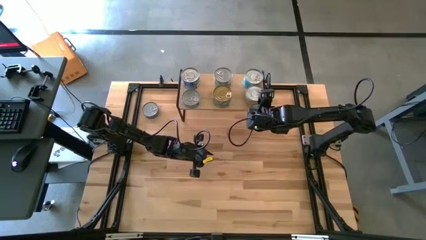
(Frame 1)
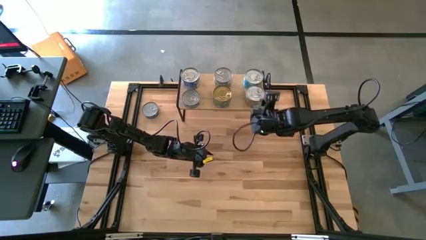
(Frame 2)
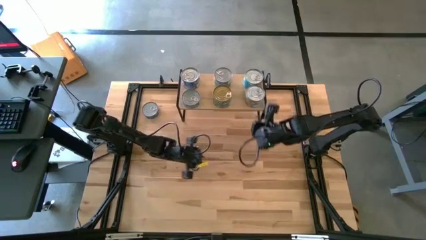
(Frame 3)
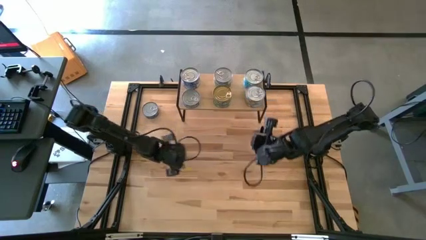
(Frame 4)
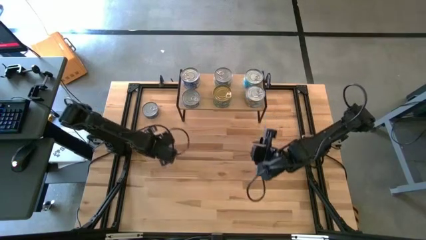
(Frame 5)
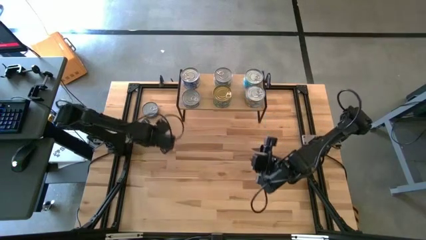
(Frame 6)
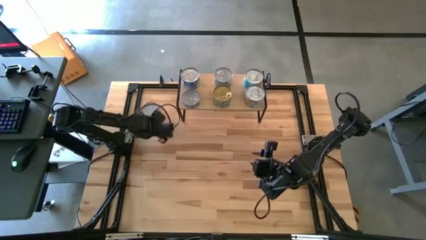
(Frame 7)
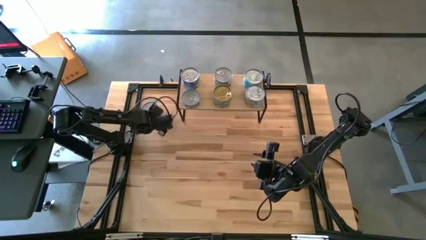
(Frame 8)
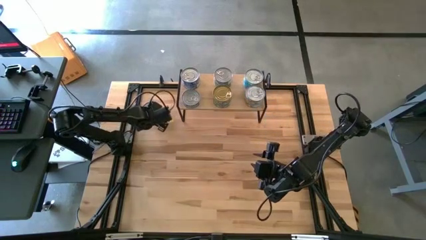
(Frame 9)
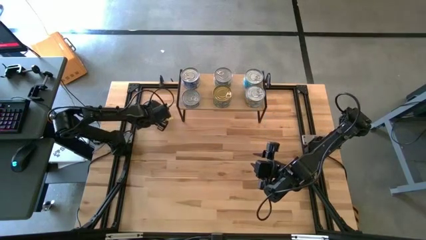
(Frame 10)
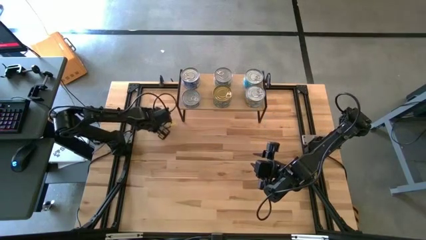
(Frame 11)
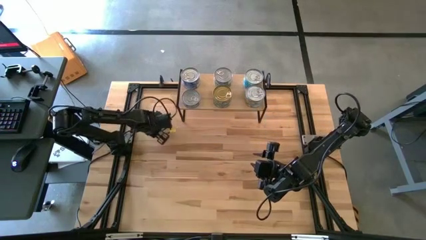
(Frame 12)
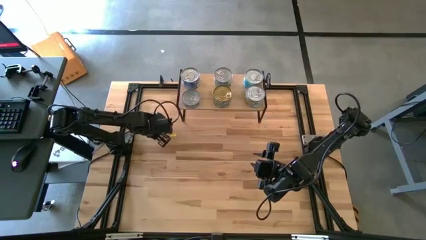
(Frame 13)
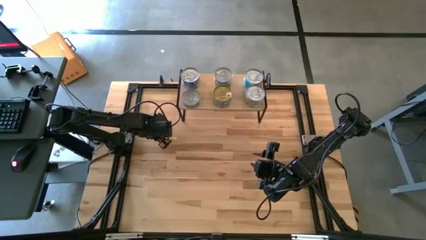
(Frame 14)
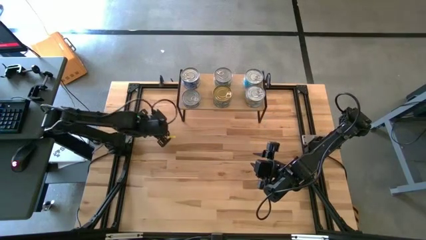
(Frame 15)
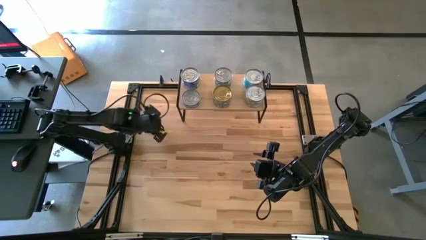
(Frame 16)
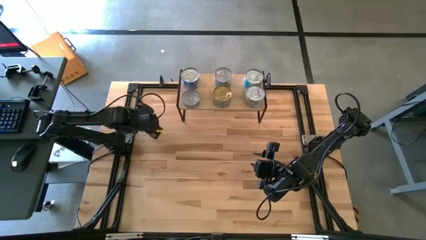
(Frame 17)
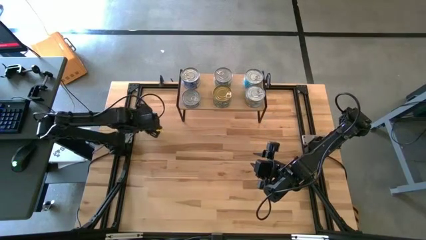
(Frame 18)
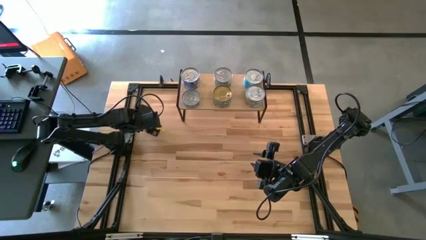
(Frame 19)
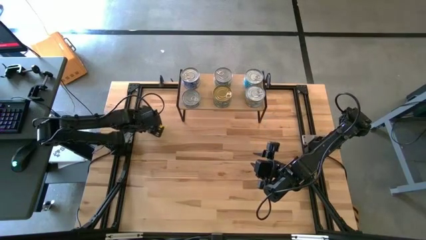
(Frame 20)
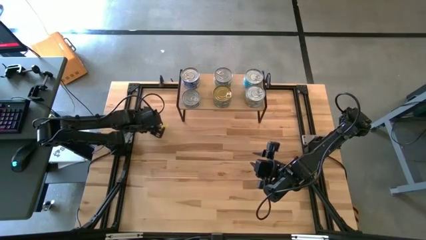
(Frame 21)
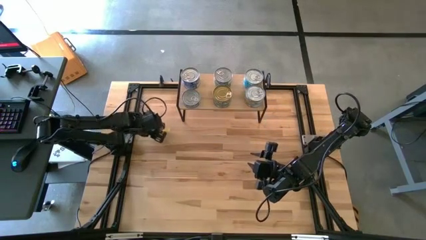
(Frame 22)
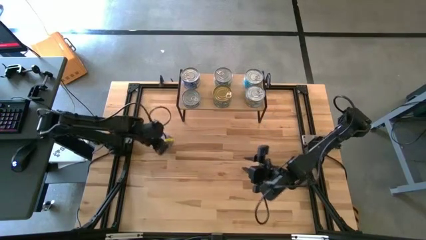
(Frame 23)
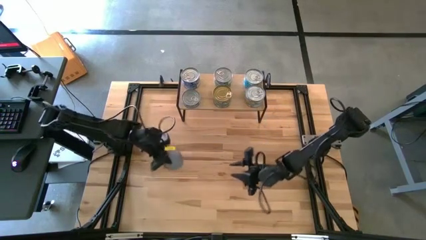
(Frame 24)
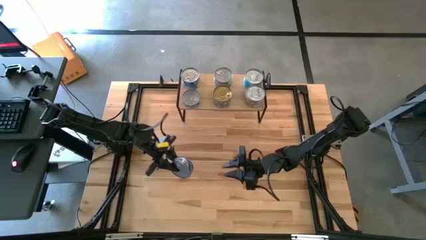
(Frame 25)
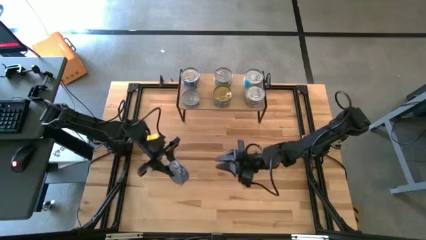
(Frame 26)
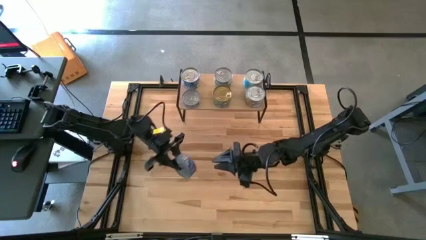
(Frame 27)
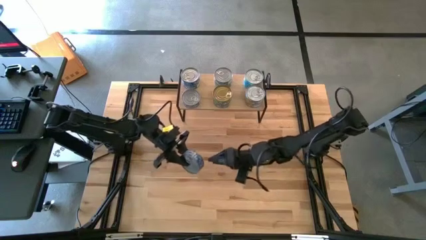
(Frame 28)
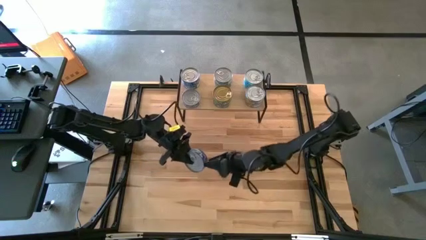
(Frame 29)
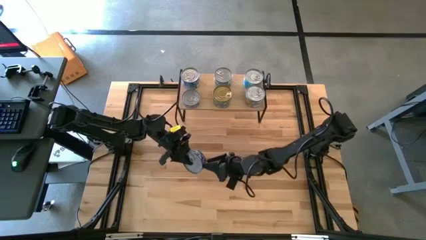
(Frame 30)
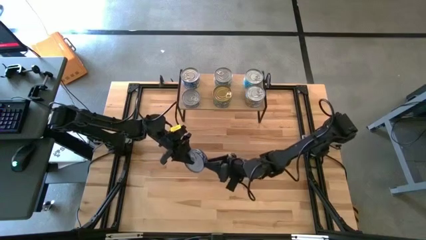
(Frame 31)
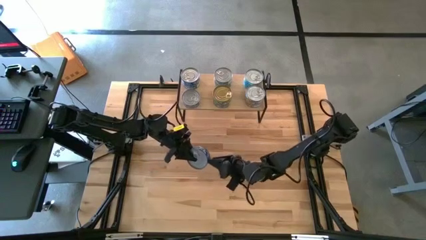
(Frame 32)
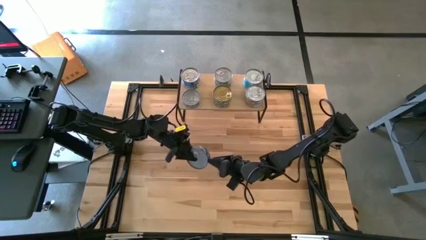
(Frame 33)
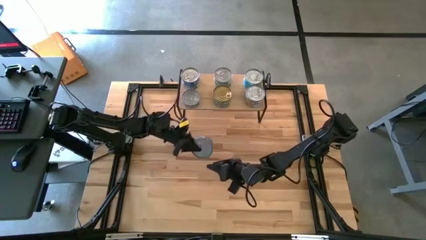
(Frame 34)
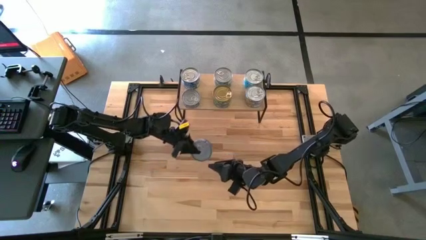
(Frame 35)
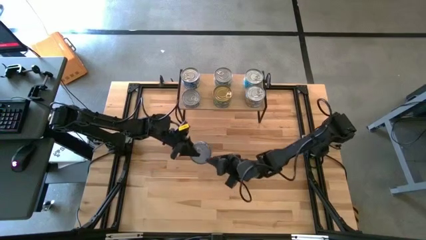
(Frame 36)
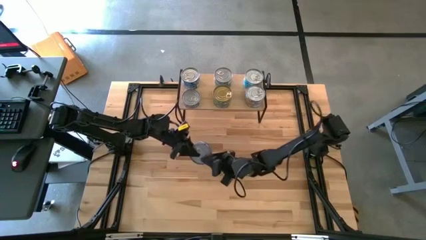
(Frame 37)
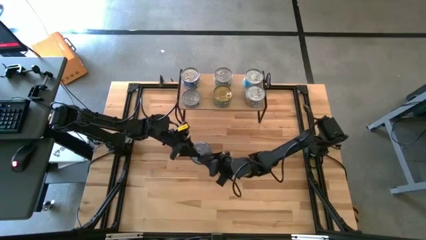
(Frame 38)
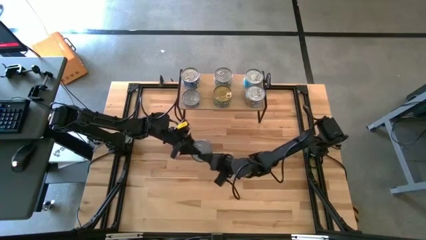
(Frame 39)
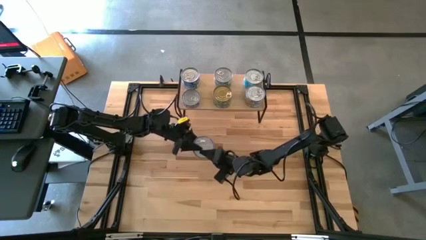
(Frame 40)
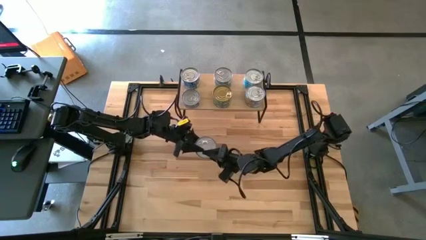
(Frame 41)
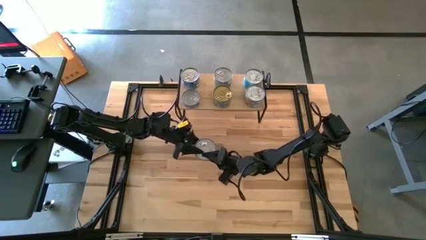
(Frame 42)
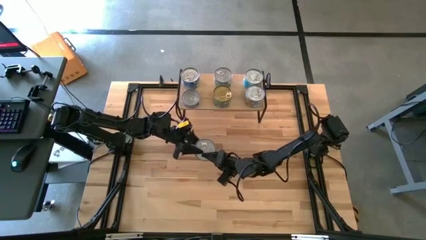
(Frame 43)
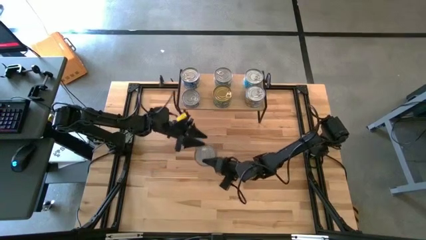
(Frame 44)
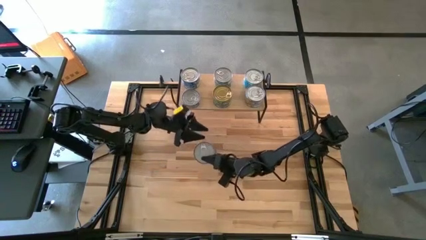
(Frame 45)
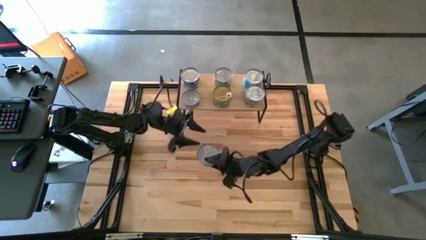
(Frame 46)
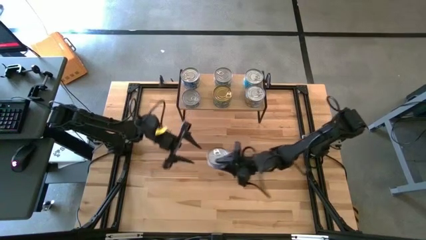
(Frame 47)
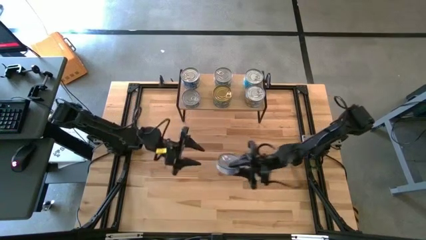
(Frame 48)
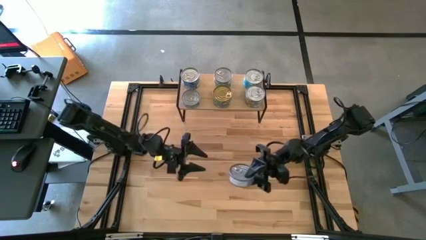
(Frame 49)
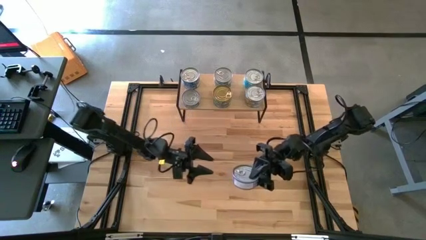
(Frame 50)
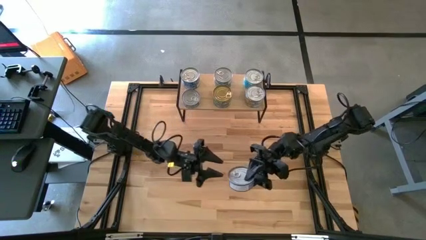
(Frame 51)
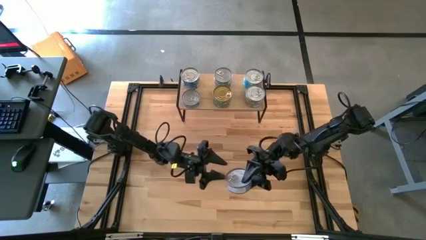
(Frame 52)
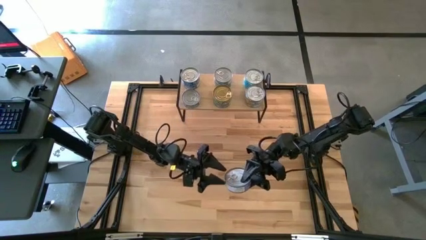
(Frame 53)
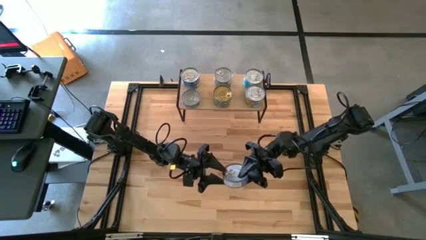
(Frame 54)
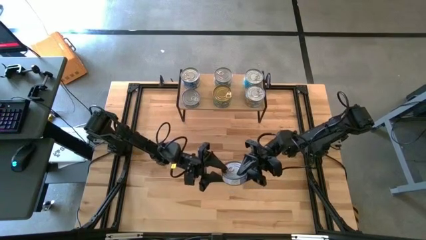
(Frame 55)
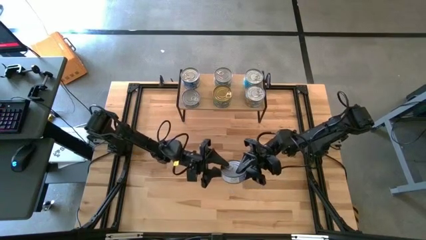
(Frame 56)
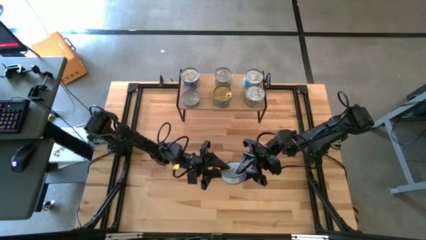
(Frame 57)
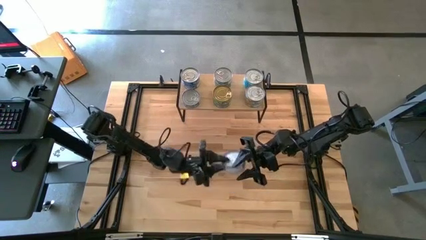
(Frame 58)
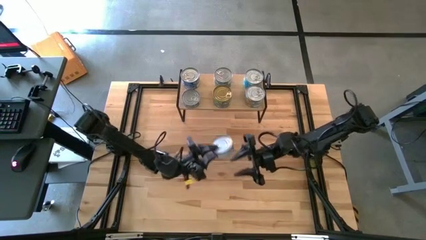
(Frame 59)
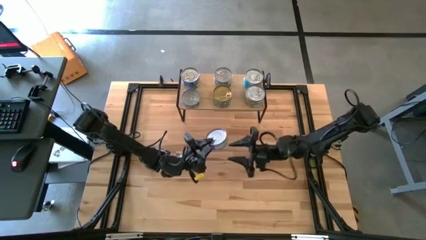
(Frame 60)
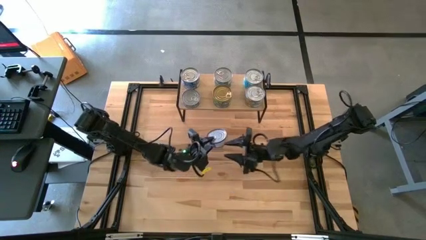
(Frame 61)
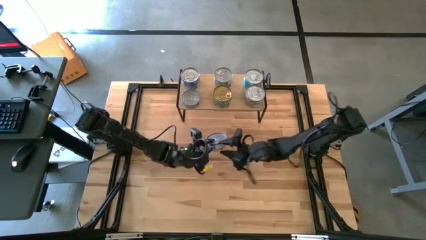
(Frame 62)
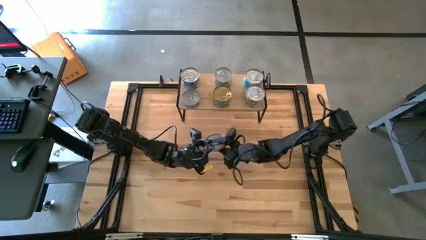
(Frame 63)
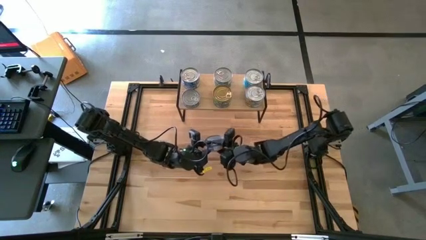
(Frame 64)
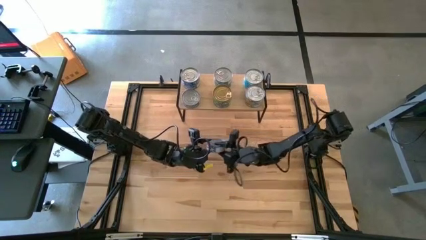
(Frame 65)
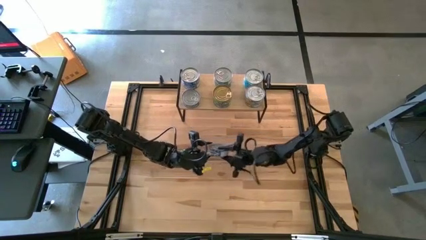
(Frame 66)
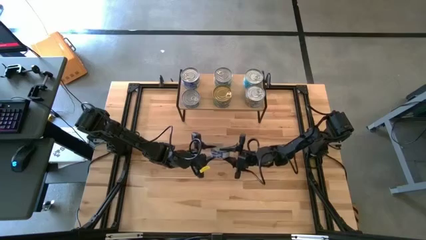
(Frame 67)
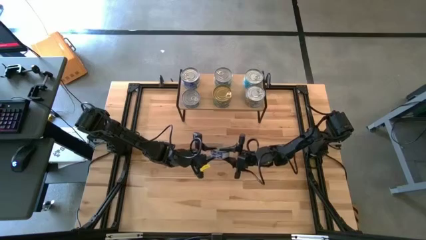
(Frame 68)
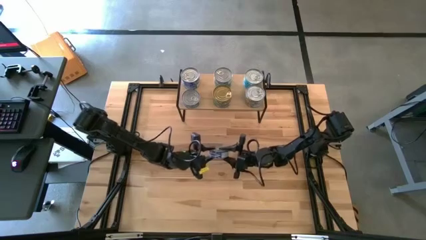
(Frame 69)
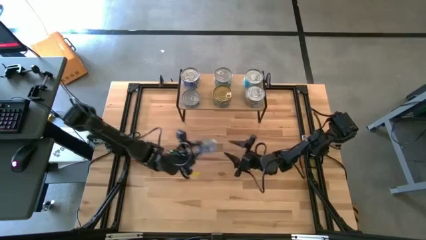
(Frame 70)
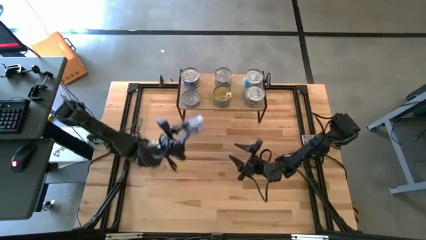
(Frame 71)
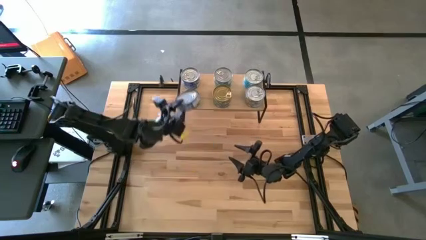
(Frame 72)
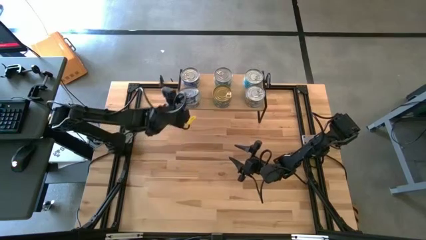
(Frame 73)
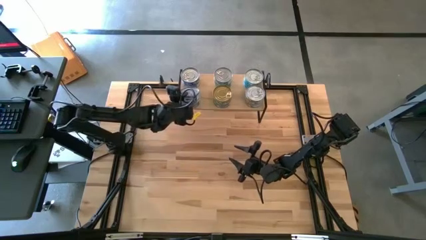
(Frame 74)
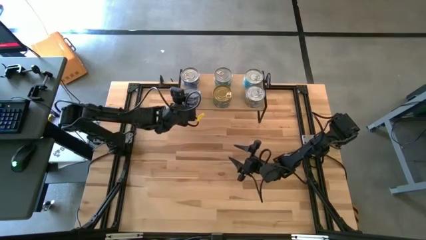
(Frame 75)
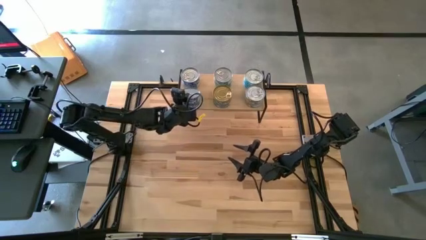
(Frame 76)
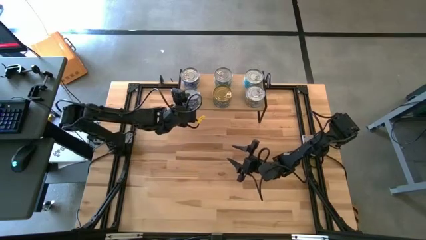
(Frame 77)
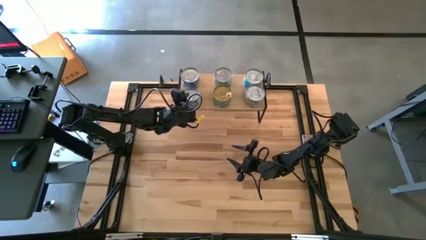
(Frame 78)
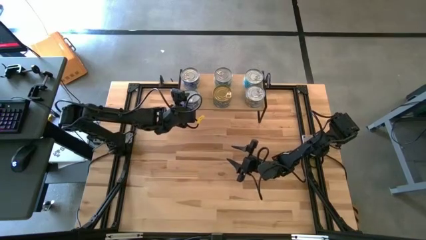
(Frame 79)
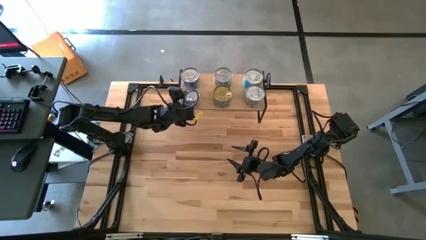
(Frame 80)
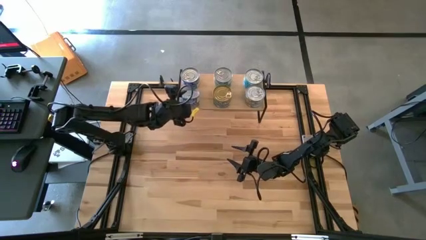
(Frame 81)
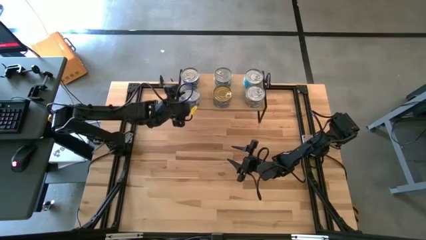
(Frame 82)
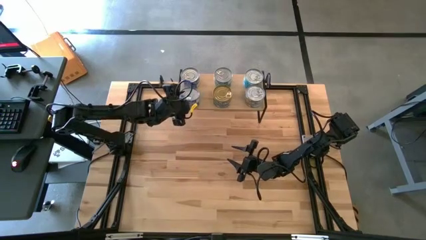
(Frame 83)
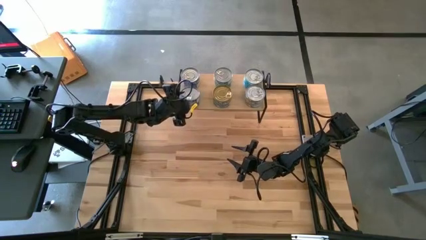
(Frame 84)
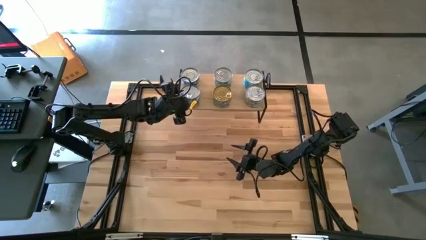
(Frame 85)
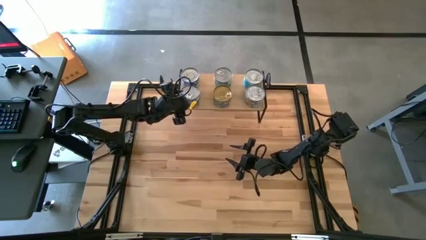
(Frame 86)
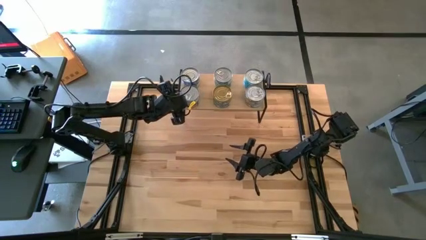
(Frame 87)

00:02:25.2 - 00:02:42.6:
Task: Stack canned seafood by type on shelf
Stack the blue tuna can on top of the blue tuna can on the shelf
